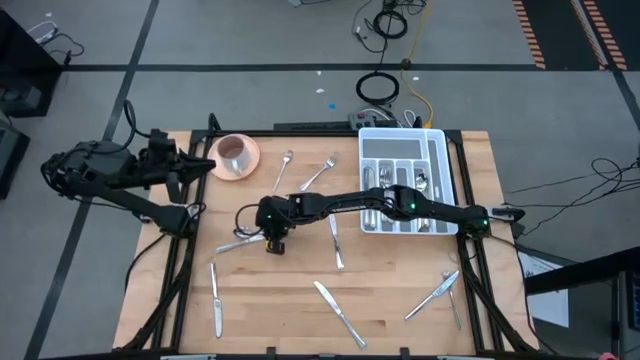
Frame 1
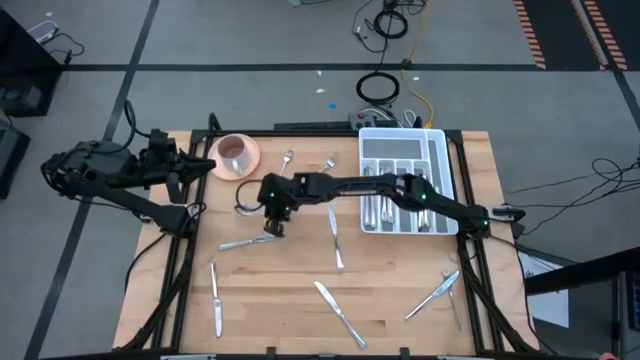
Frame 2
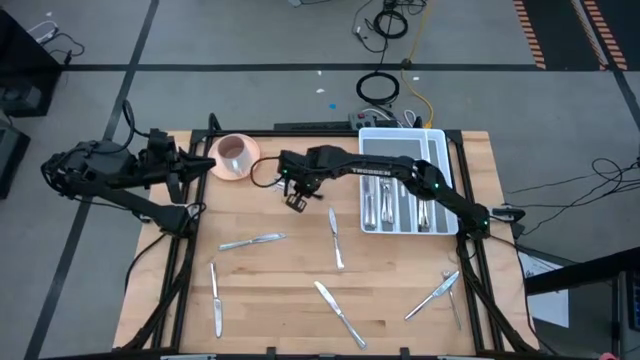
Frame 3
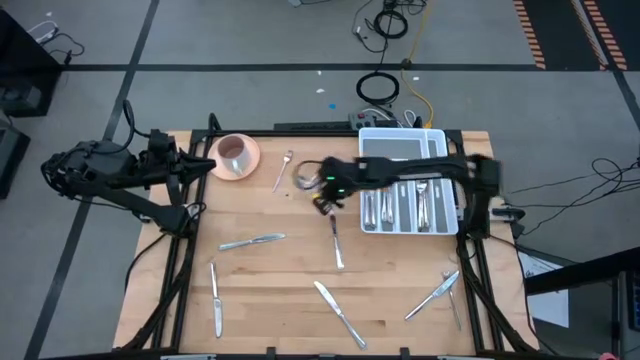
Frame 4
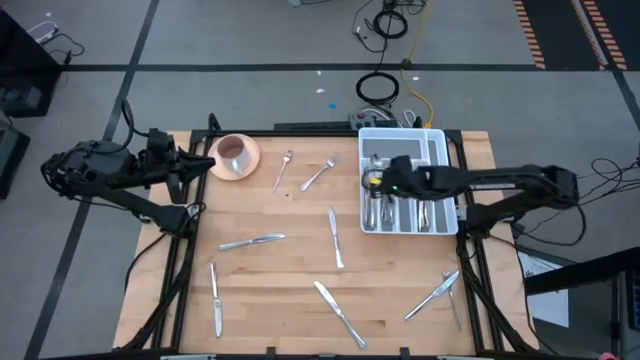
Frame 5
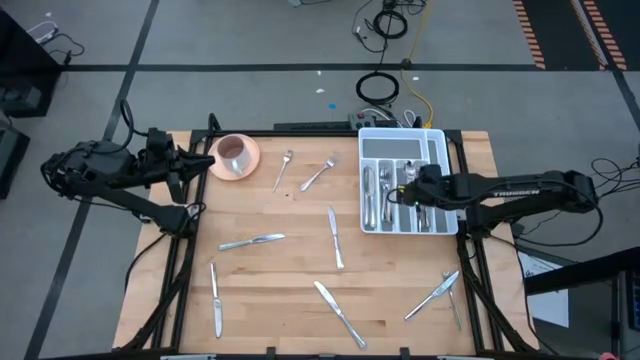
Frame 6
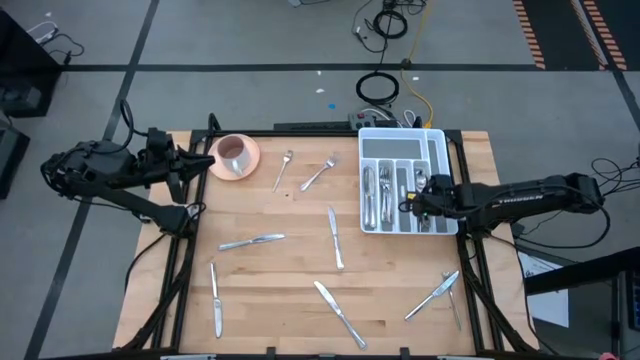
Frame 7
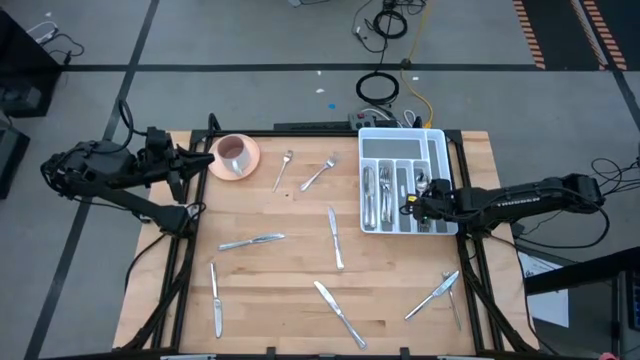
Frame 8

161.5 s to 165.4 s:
Task: Sort silverware
Put the silver spoon into the white silverware tray

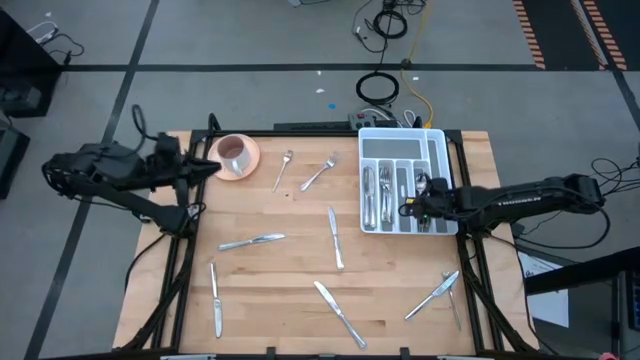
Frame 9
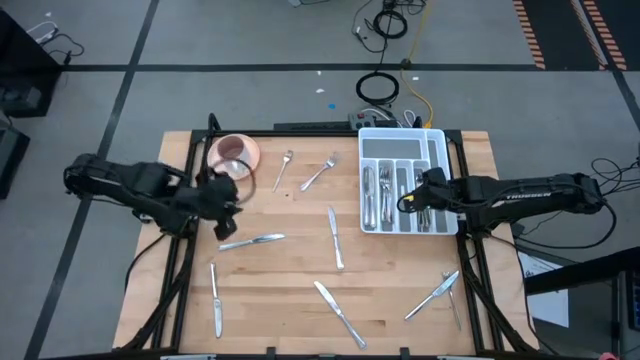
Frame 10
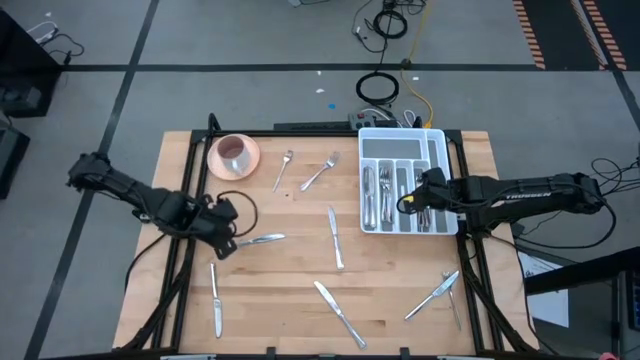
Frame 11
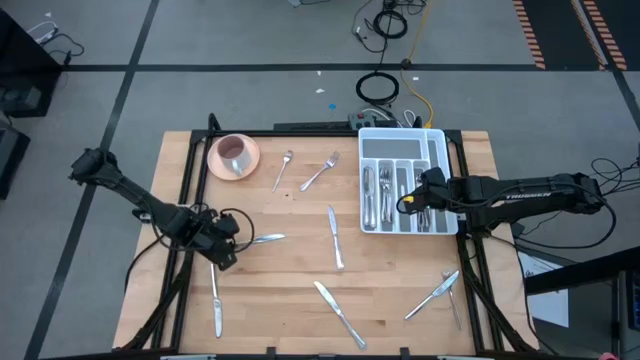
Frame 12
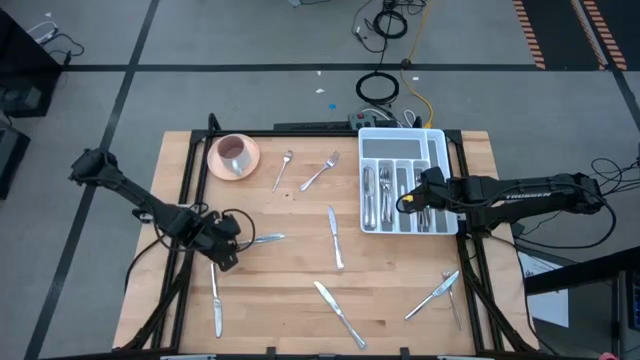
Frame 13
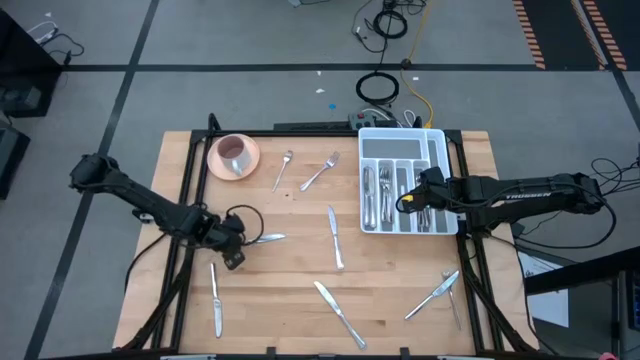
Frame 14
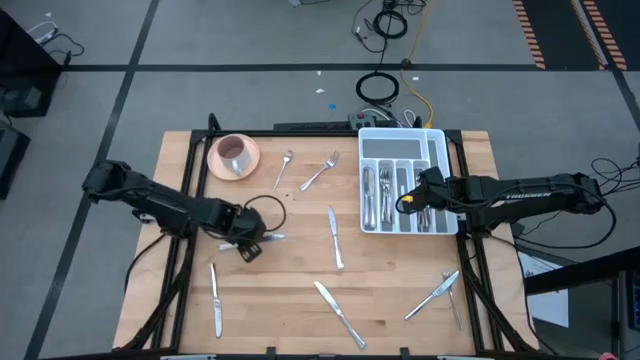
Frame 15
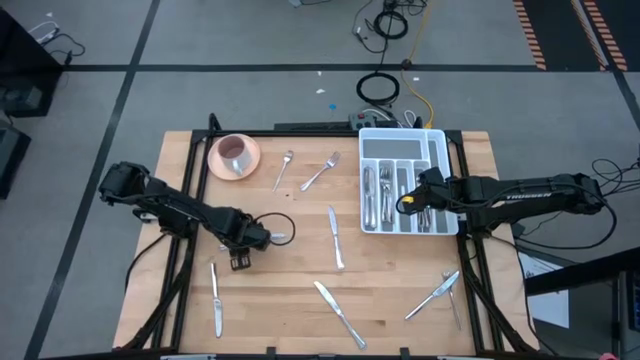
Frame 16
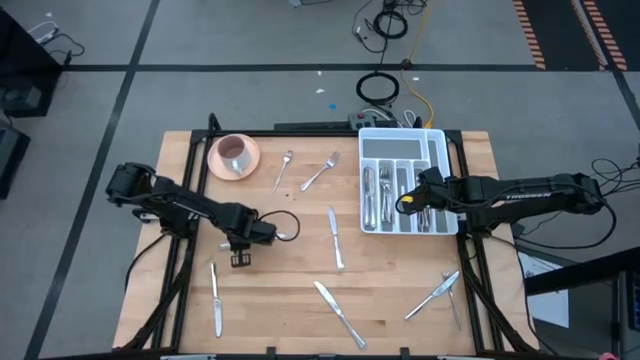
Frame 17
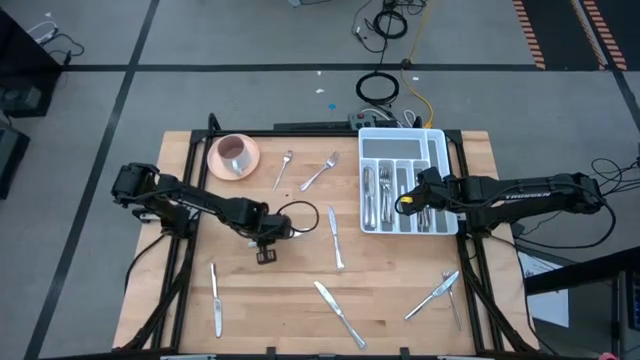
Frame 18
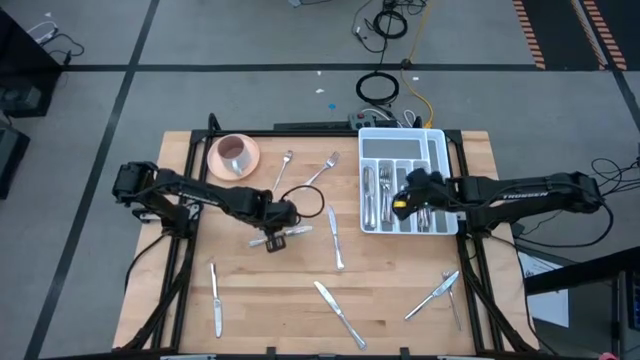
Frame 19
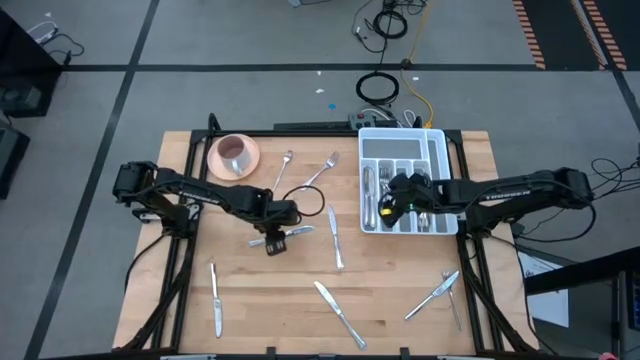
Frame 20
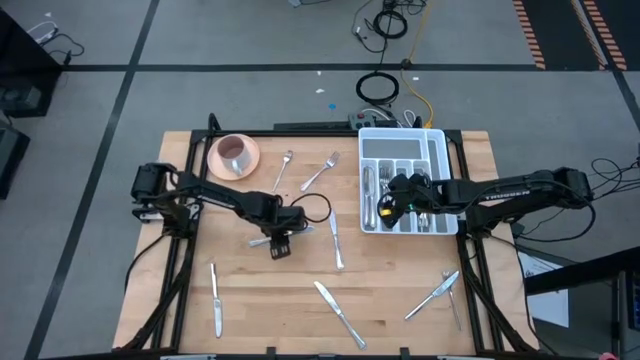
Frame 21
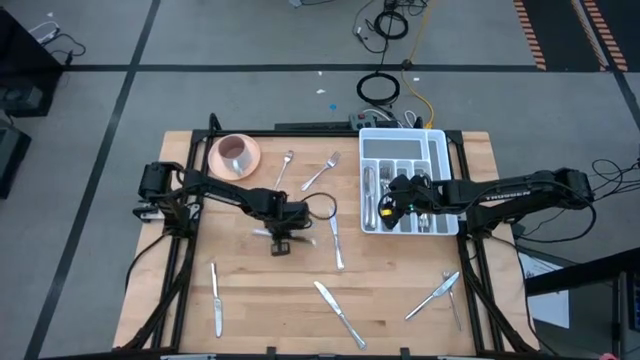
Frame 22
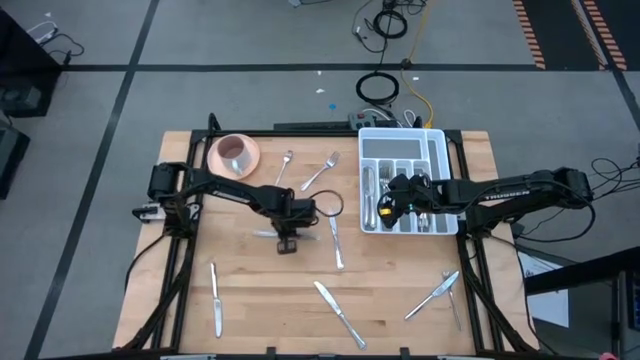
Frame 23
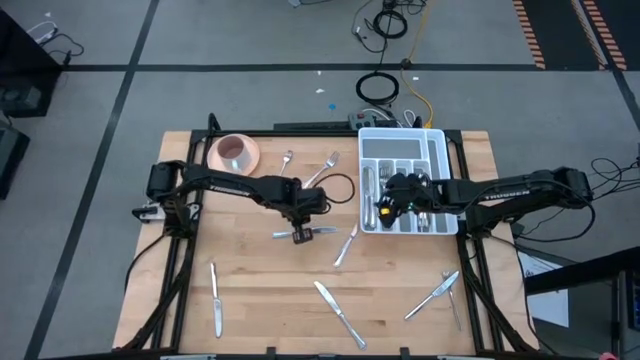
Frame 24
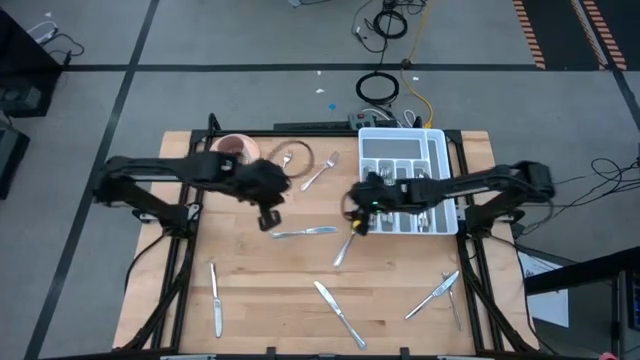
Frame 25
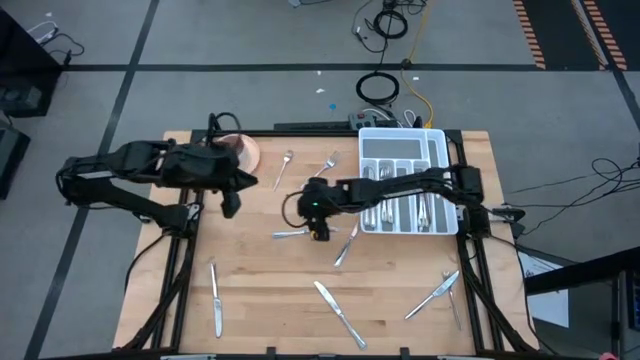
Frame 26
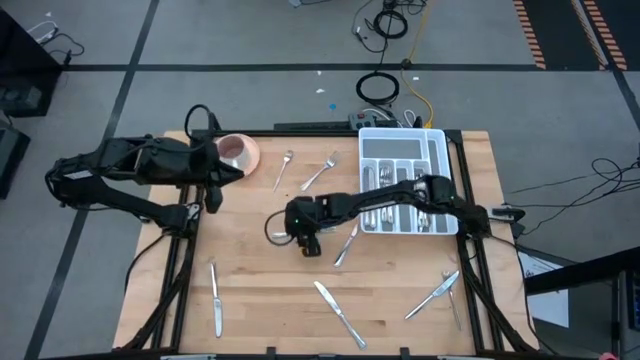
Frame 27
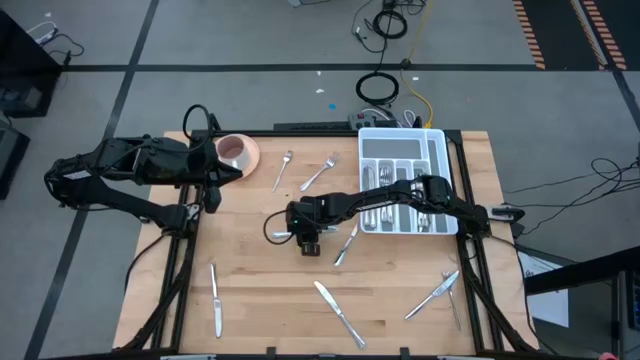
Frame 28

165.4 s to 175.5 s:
Put the silver knife into the white silverware tray

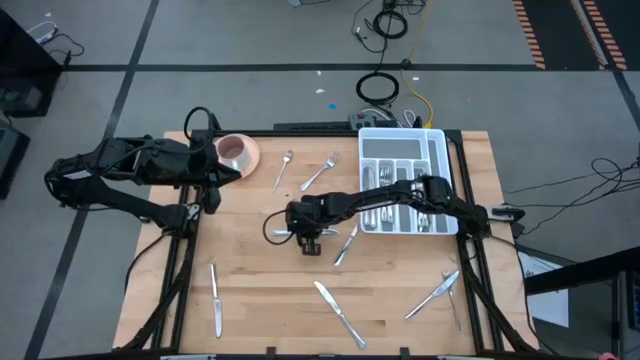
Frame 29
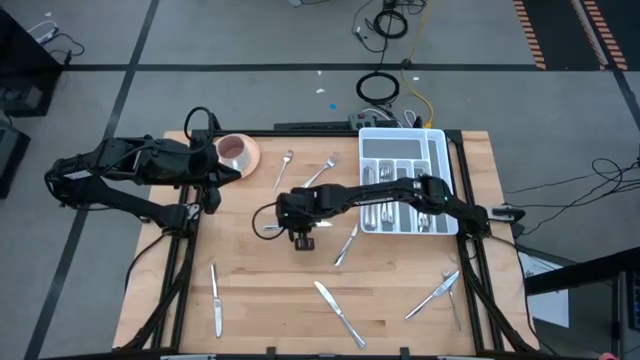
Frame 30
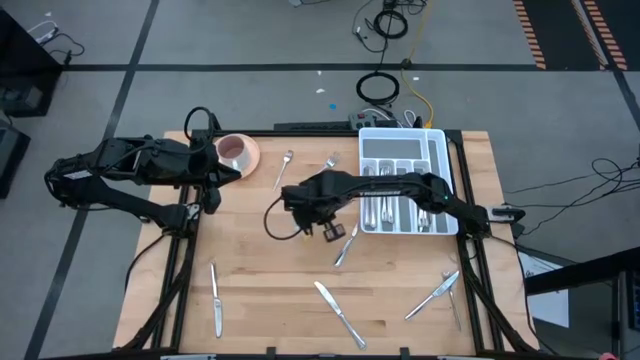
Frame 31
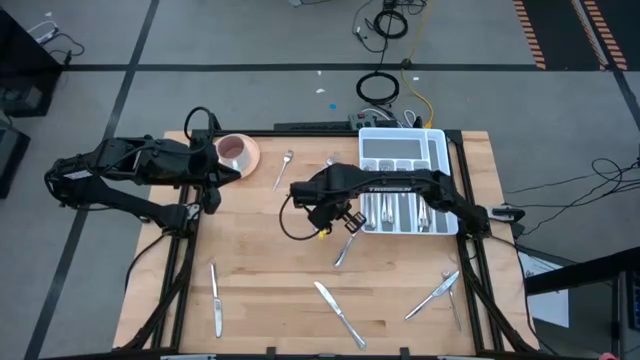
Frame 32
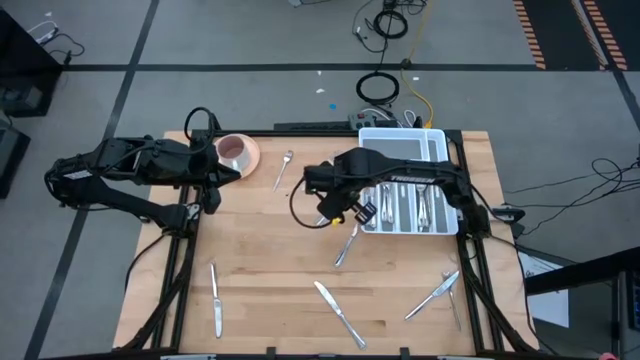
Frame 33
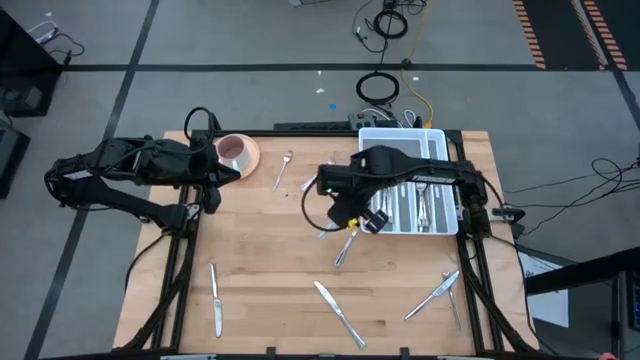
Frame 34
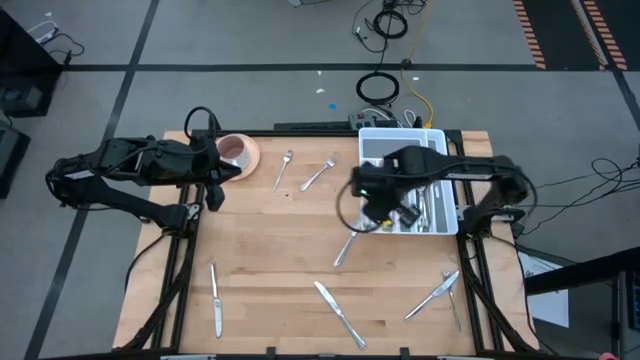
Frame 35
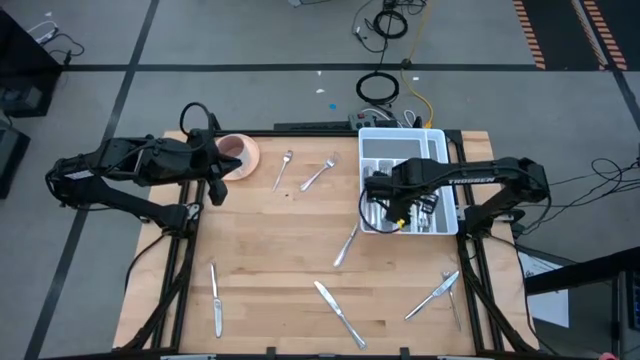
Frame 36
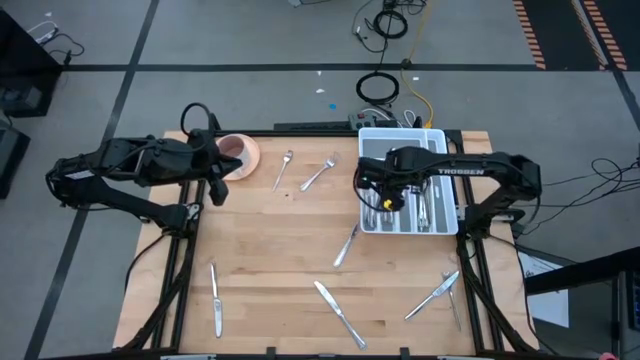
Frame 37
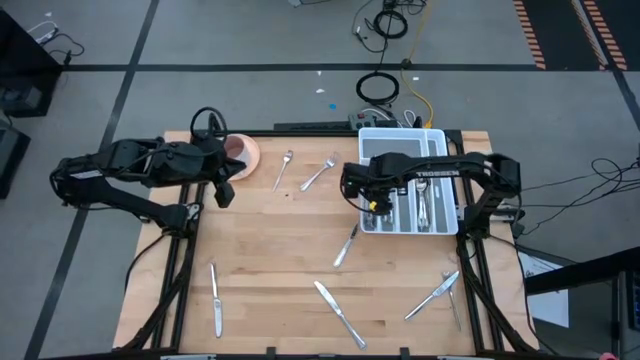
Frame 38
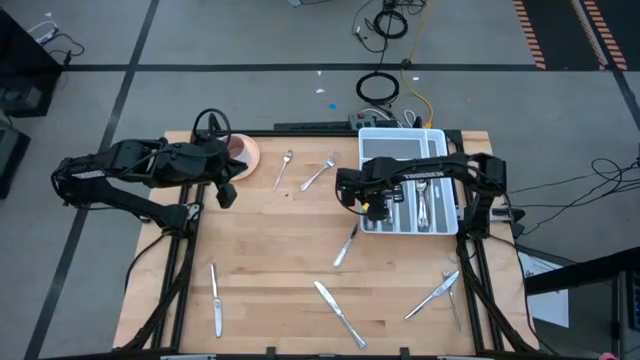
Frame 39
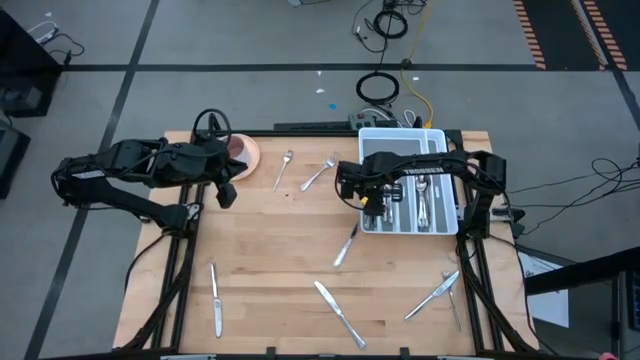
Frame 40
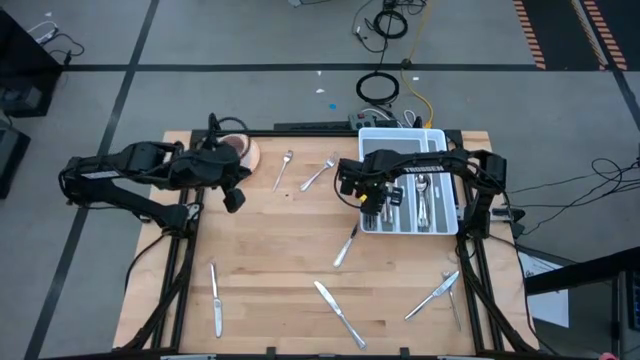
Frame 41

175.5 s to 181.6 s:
Put the silver knife into the white silverware tray
